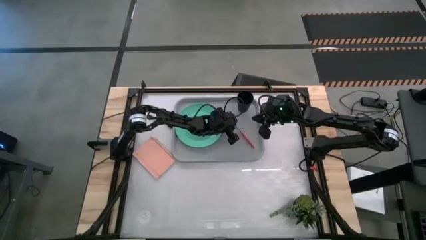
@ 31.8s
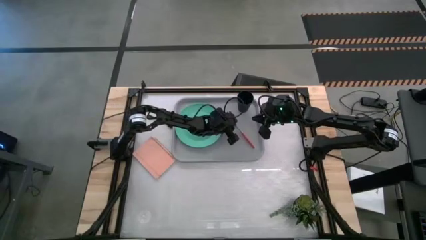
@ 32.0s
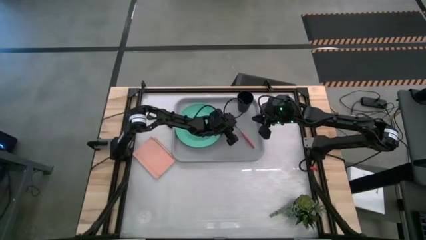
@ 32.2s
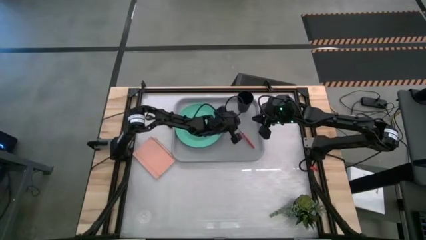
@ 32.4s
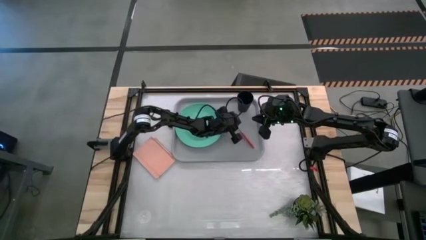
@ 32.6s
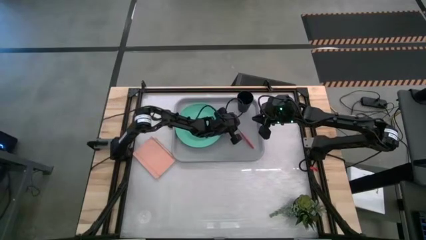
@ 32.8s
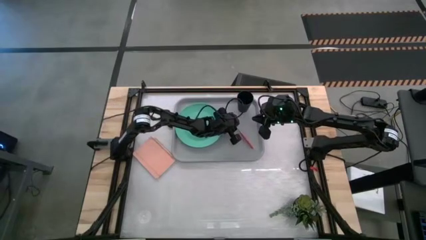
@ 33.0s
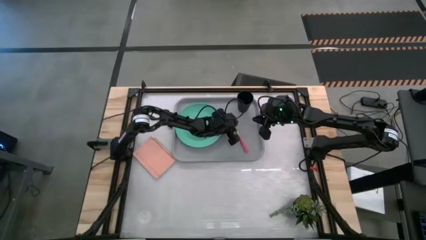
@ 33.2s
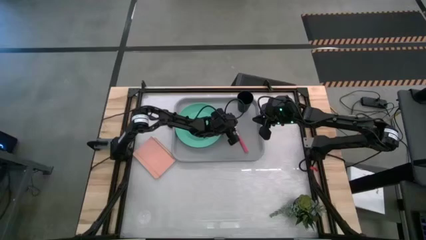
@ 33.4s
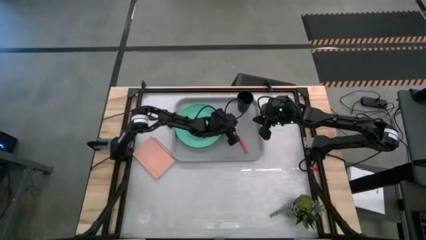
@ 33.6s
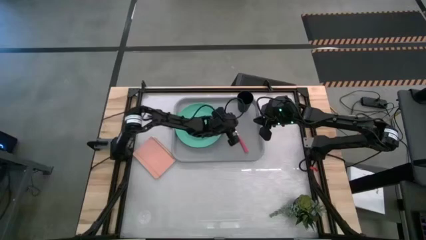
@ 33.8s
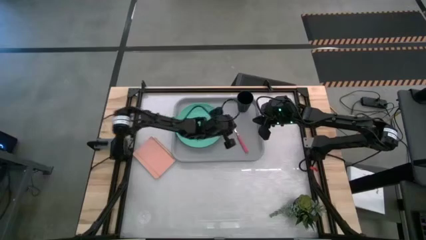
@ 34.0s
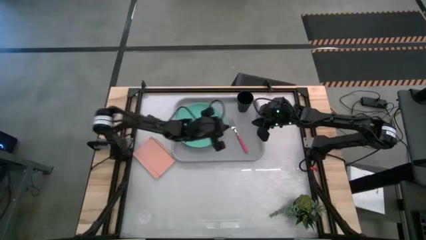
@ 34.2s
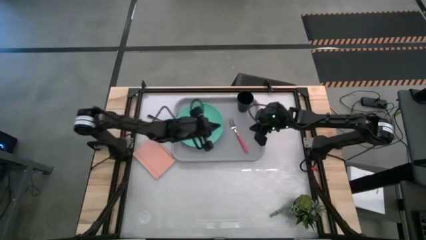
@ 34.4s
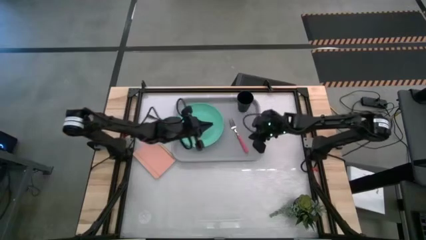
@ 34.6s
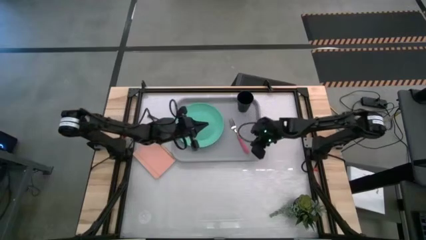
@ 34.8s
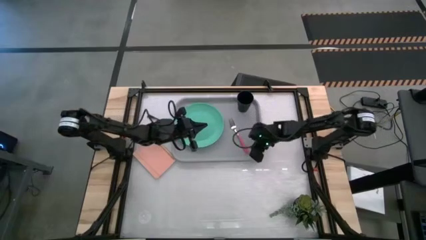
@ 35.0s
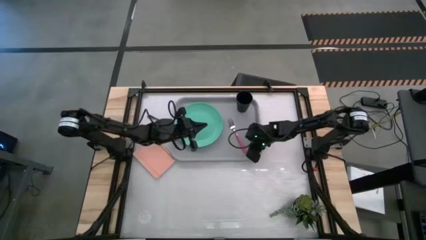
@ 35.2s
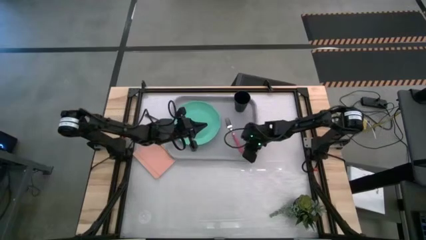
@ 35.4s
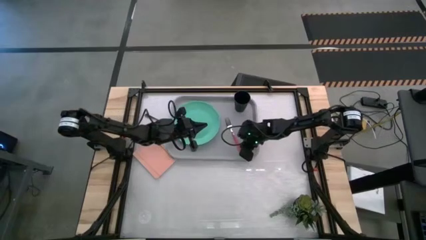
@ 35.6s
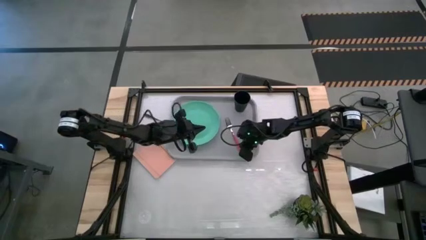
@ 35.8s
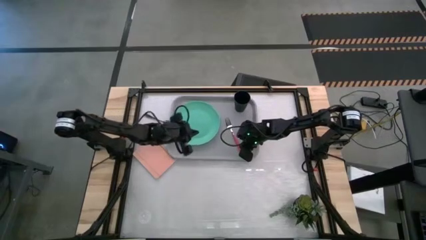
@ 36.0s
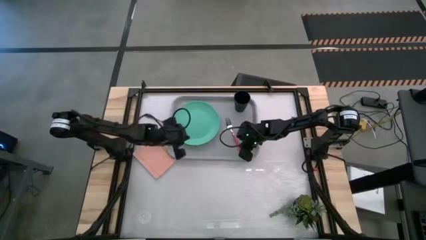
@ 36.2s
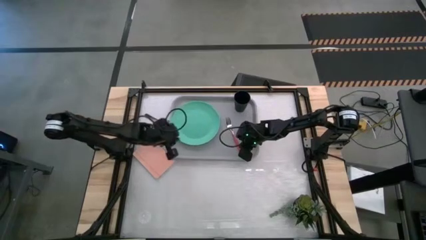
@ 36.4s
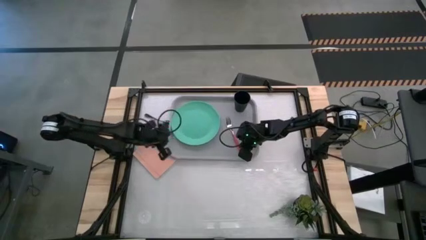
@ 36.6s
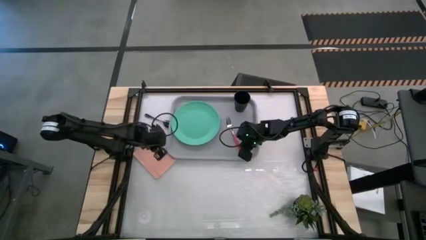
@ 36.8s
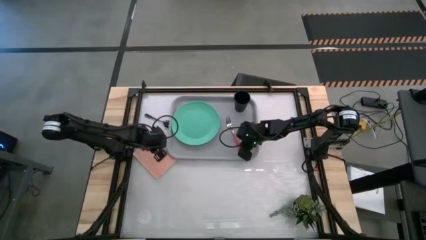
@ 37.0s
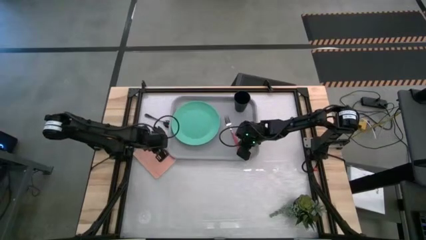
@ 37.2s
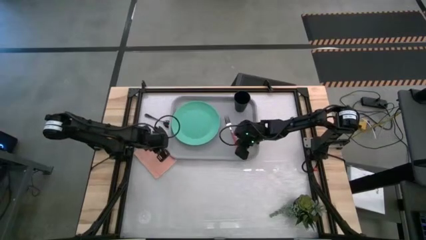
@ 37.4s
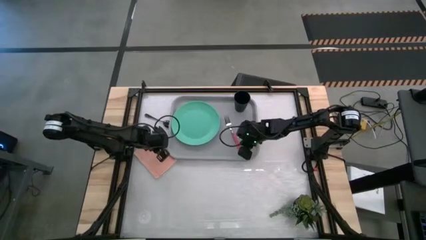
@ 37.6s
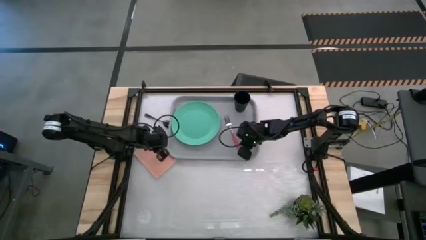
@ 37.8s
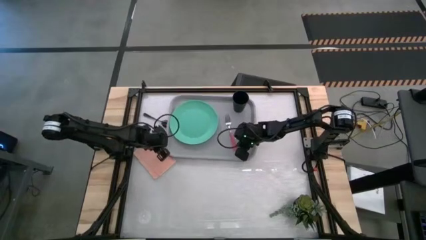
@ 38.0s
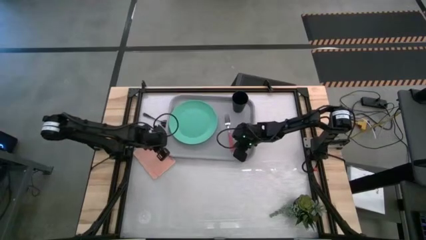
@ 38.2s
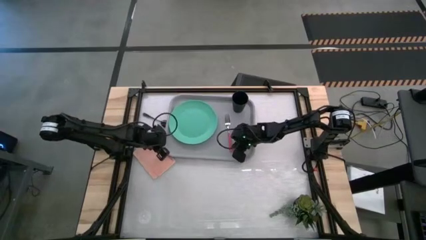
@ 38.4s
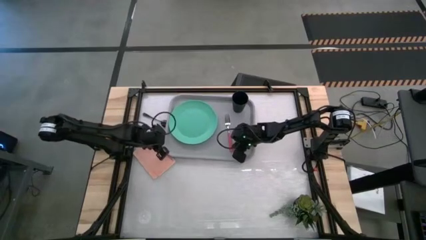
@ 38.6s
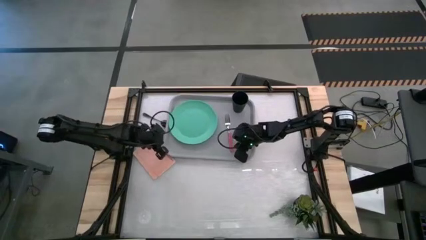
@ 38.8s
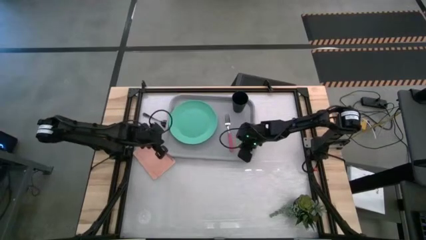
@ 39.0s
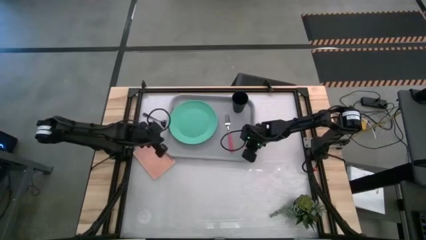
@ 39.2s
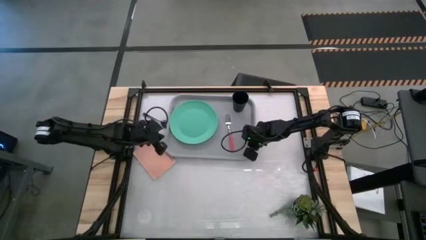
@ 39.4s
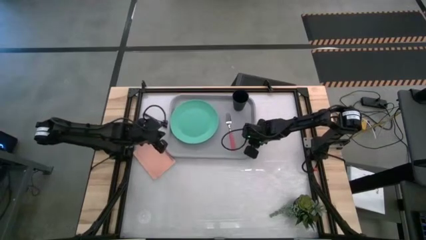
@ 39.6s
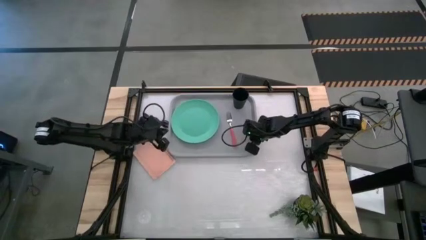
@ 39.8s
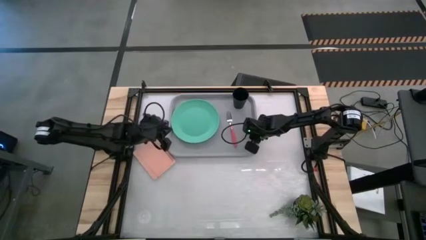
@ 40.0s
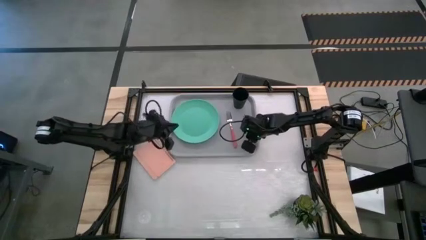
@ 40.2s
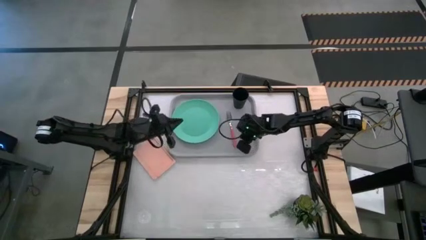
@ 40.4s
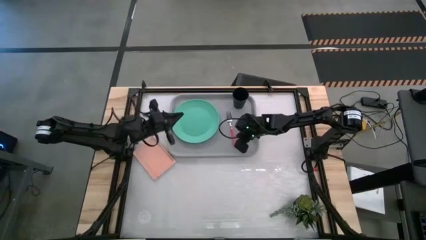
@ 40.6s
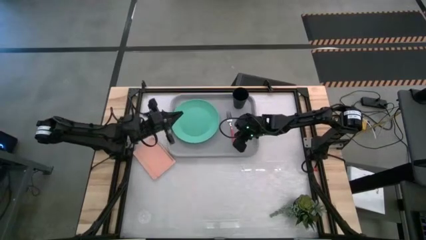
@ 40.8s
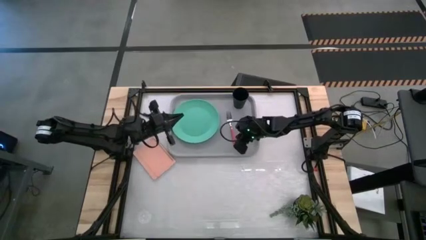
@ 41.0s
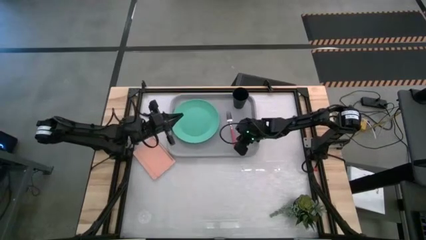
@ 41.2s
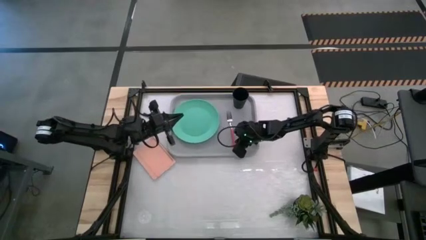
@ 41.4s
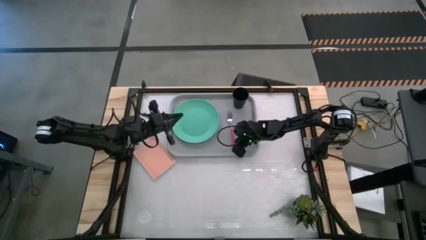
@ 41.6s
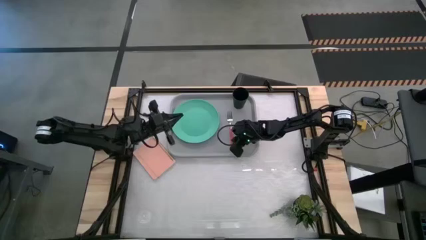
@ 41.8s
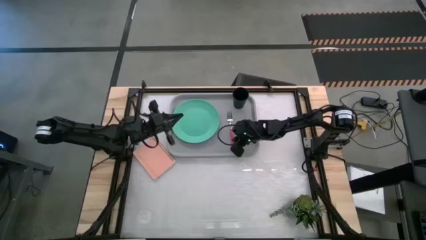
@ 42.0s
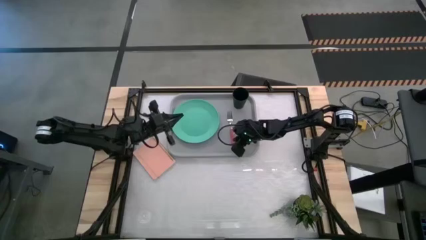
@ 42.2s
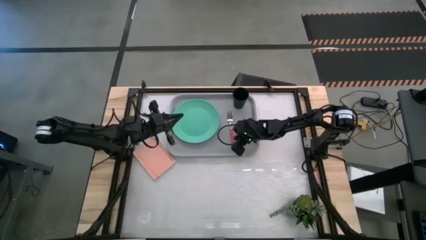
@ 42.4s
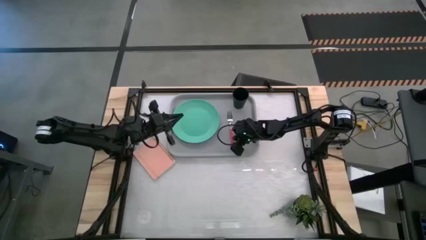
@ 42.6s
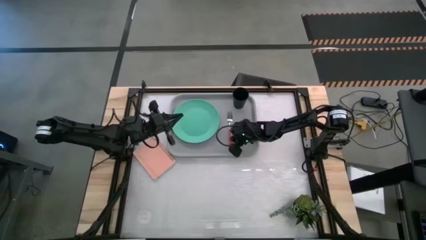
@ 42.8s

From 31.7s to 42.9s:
Task: Pick and place plate/cup/fork/spoon on tray
Put the pink fork on the gray serving tray to the right of the green plate

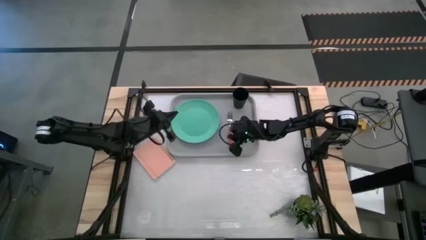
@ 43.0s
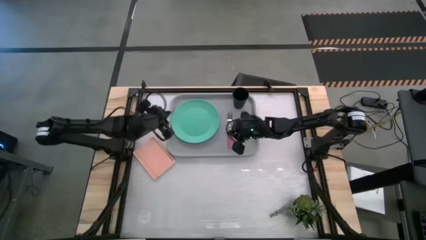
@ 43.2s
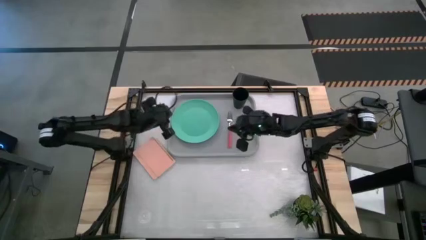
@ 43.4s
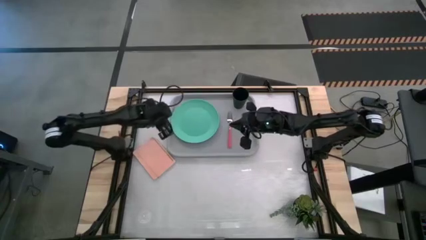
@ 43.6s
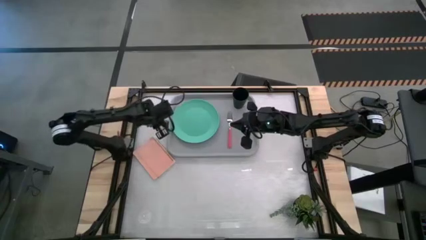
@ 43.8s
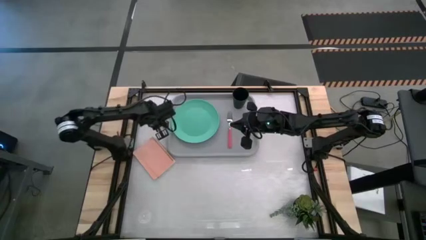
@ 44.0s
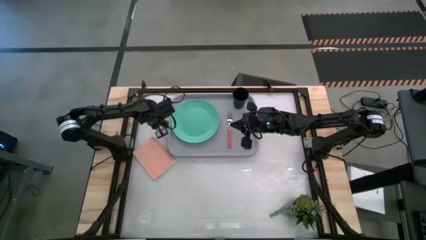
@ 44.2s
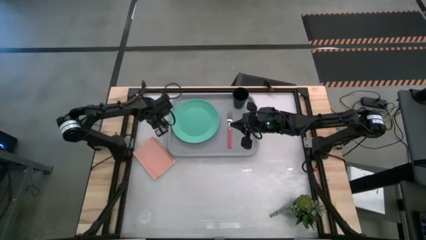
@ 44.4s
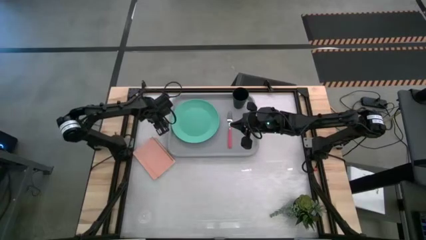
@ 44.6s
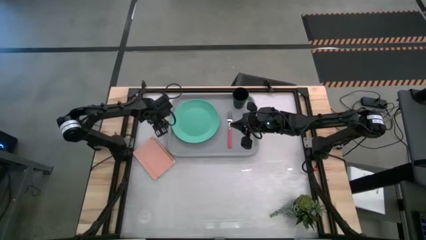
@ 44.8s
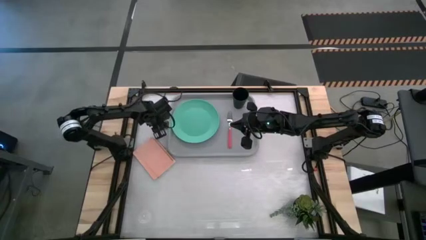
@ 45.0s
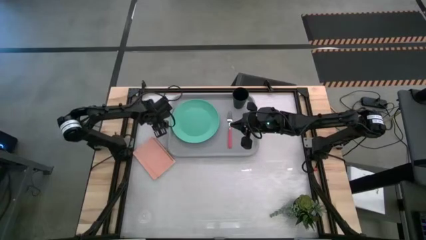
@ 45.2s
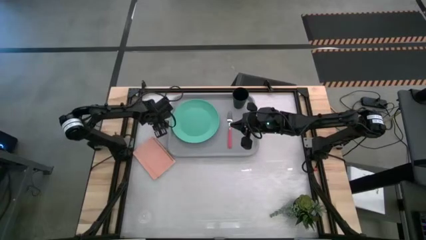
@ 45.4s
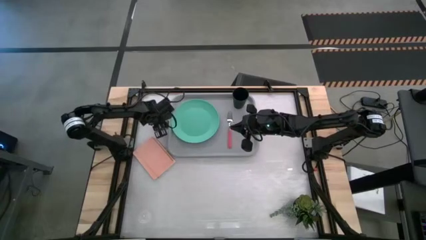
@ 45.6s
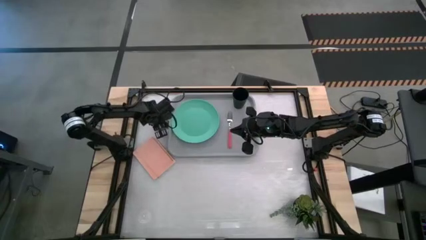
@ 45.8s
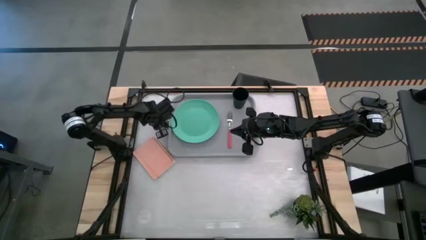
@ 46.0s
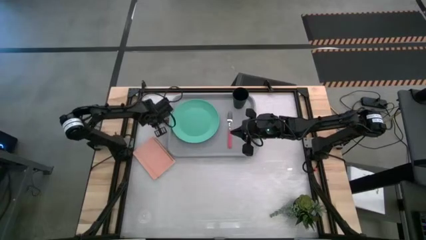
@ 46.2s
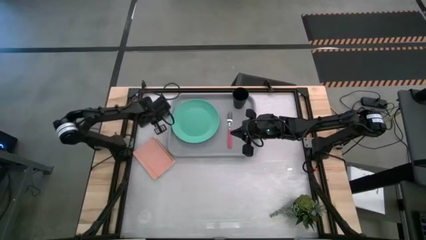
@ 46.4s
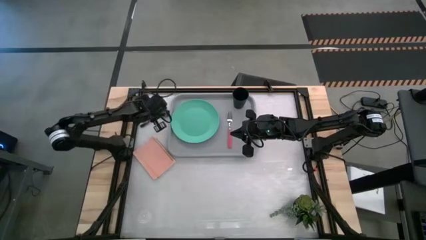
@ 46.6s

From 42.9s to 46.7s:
Put the black spoon on the gray serving tray to the right of the pink fork
